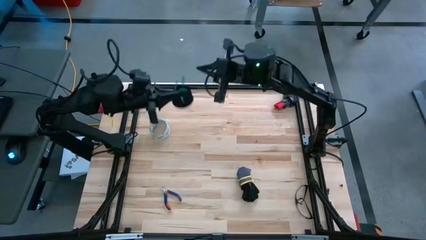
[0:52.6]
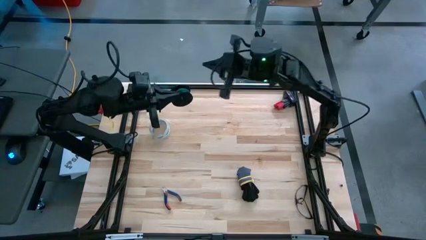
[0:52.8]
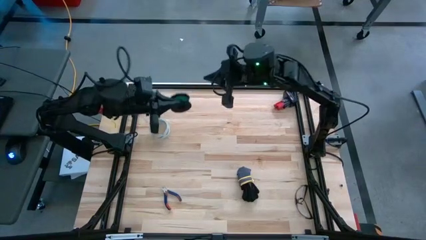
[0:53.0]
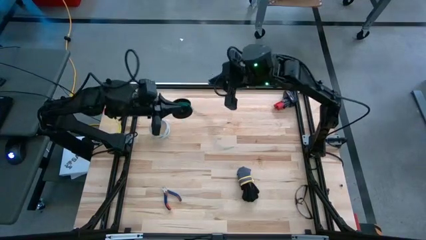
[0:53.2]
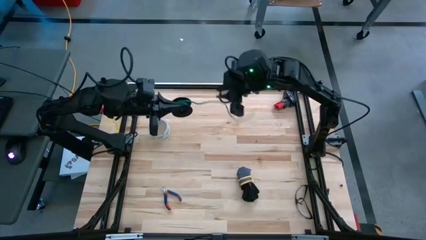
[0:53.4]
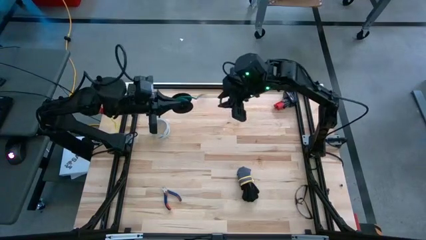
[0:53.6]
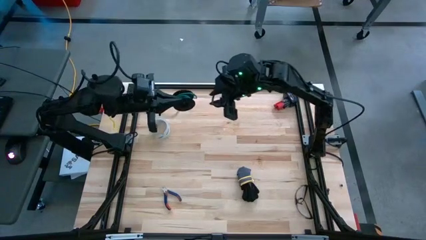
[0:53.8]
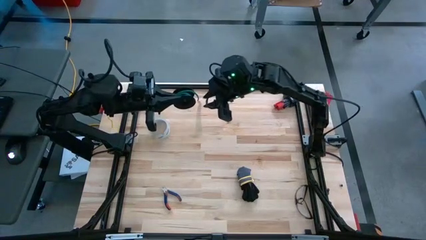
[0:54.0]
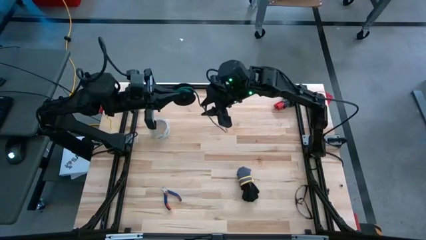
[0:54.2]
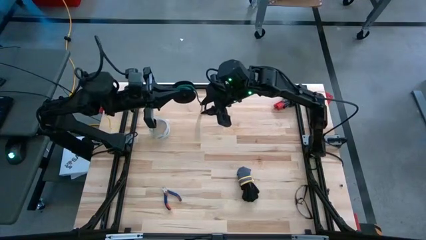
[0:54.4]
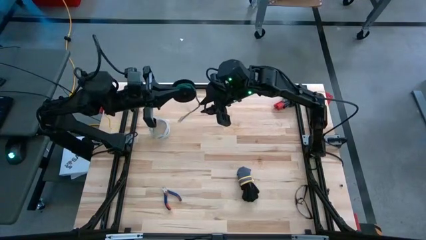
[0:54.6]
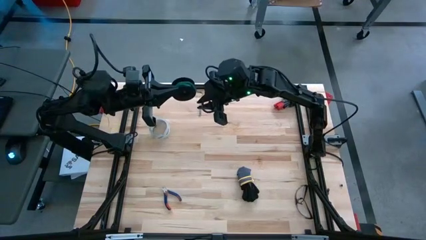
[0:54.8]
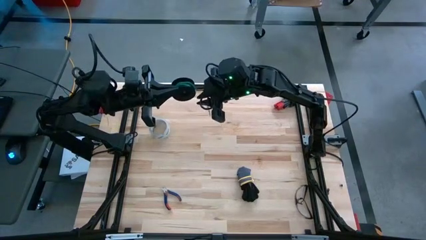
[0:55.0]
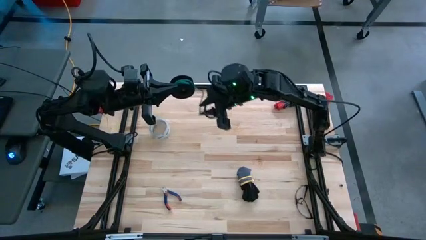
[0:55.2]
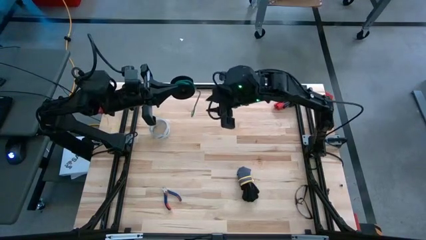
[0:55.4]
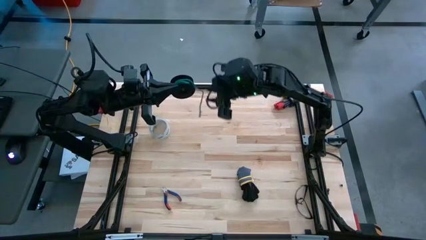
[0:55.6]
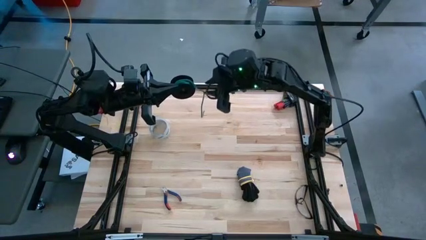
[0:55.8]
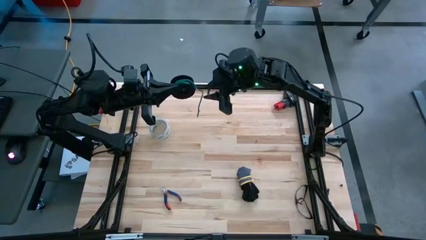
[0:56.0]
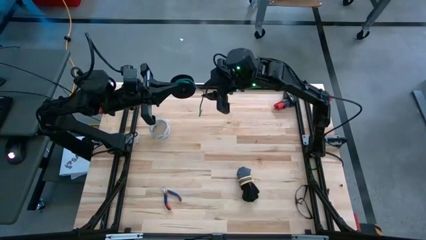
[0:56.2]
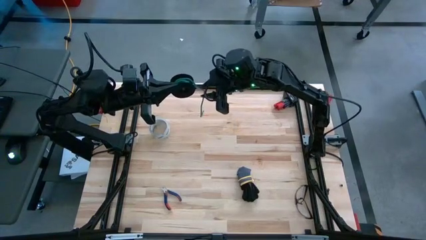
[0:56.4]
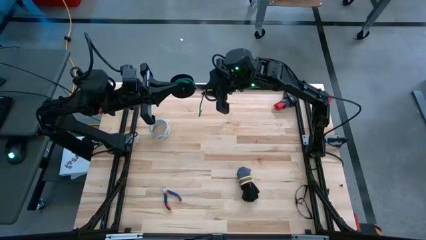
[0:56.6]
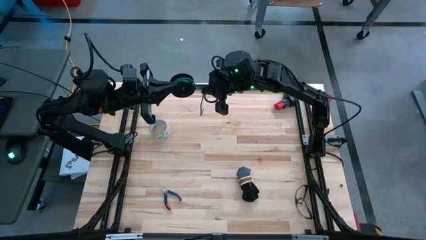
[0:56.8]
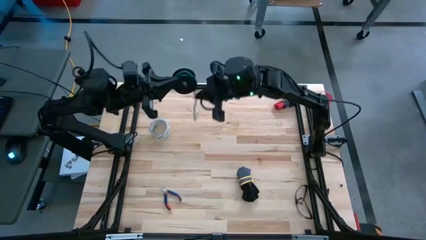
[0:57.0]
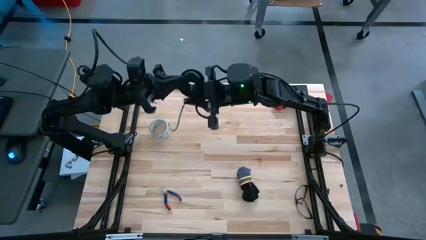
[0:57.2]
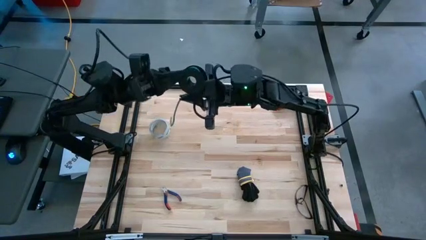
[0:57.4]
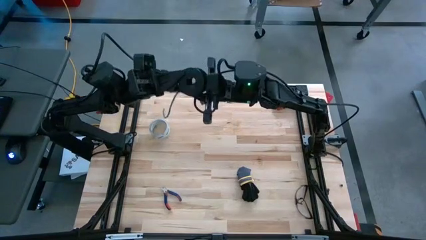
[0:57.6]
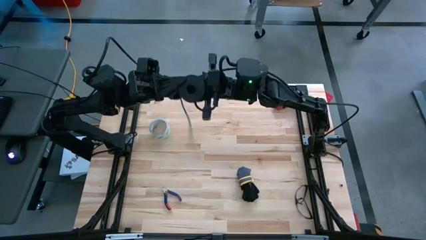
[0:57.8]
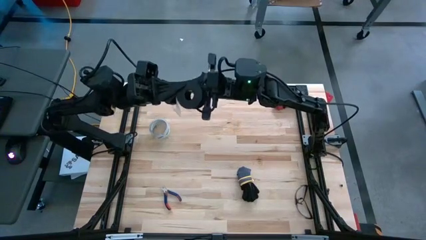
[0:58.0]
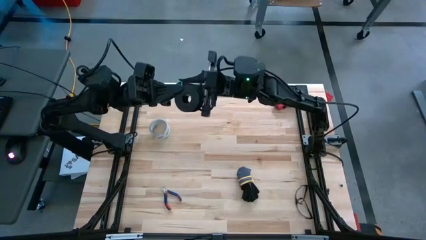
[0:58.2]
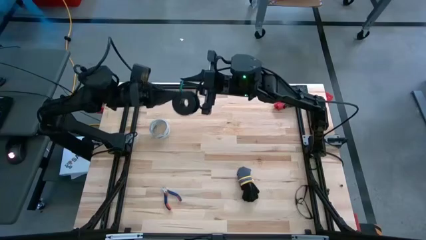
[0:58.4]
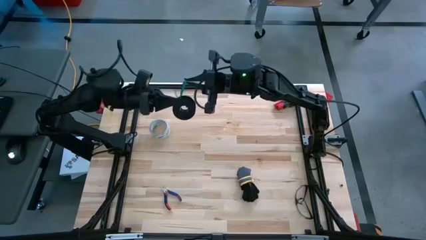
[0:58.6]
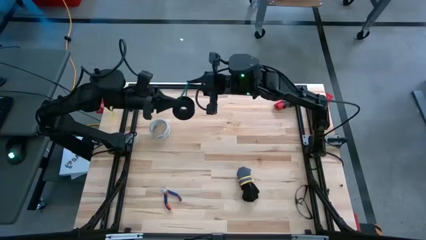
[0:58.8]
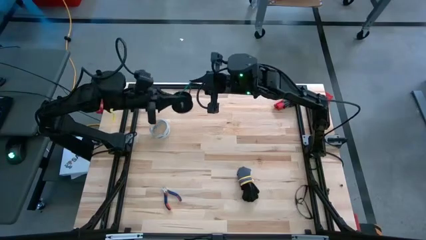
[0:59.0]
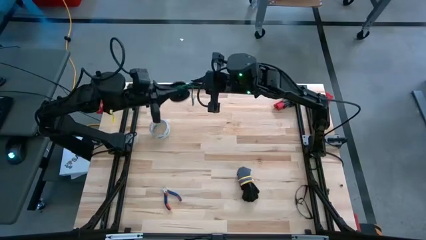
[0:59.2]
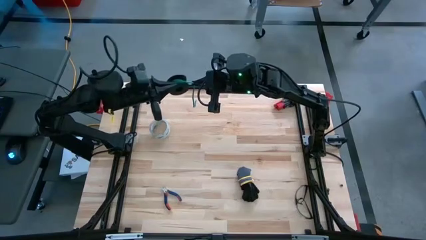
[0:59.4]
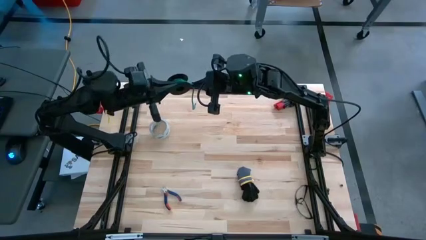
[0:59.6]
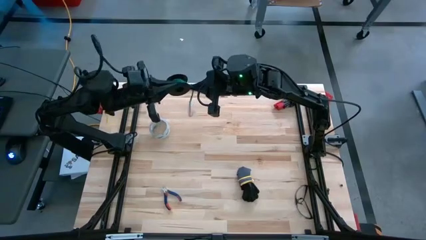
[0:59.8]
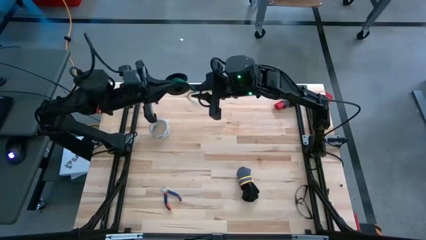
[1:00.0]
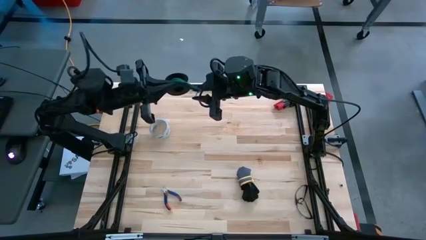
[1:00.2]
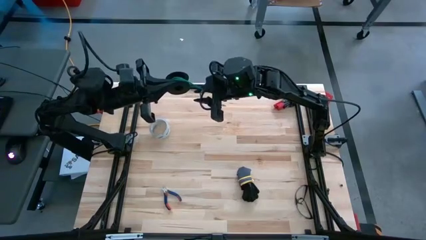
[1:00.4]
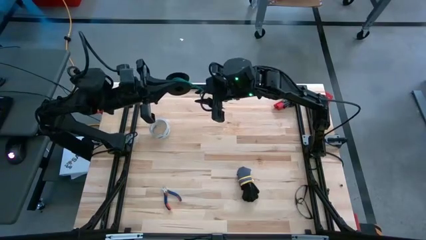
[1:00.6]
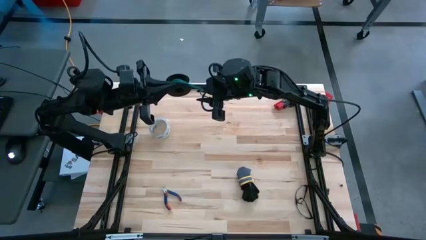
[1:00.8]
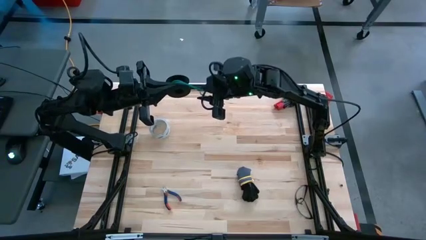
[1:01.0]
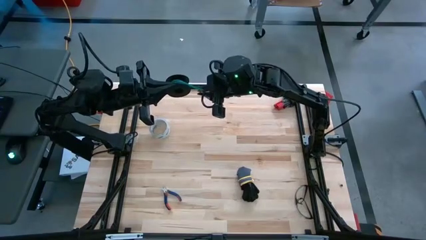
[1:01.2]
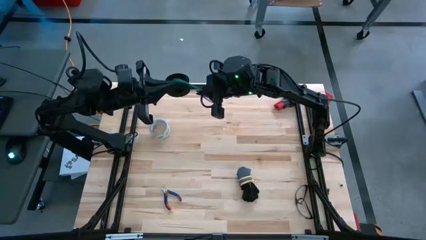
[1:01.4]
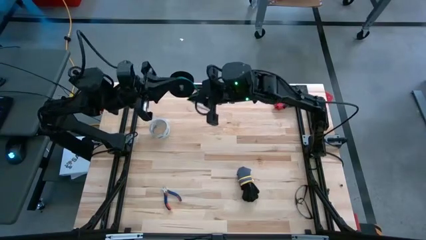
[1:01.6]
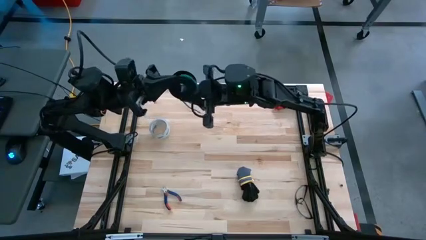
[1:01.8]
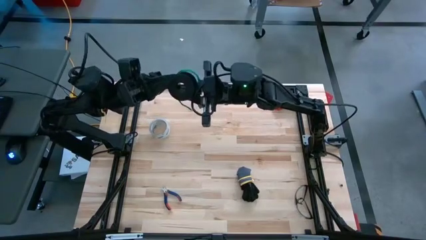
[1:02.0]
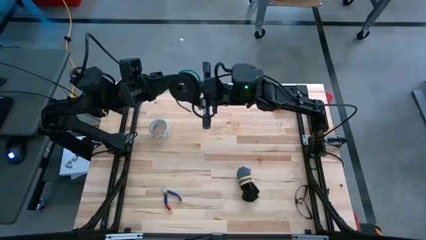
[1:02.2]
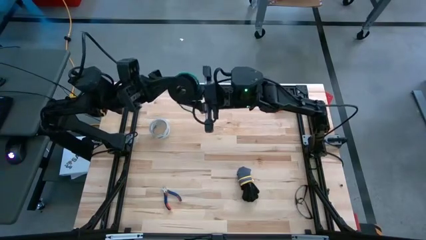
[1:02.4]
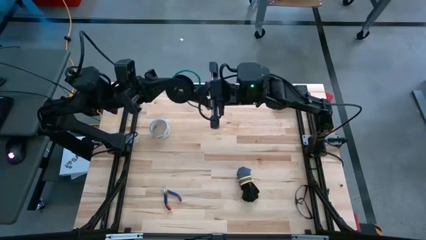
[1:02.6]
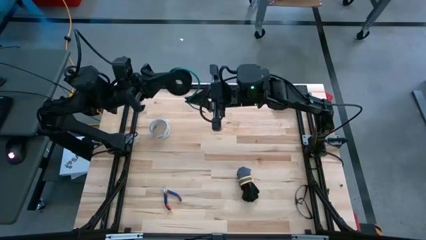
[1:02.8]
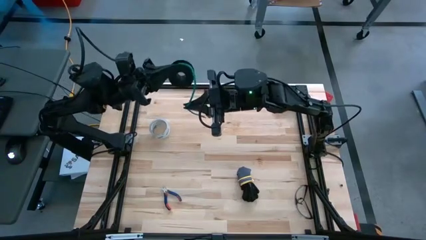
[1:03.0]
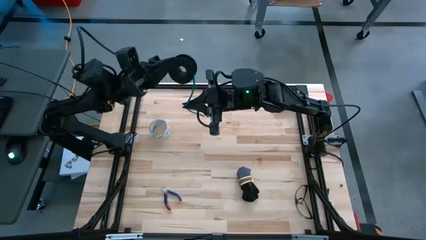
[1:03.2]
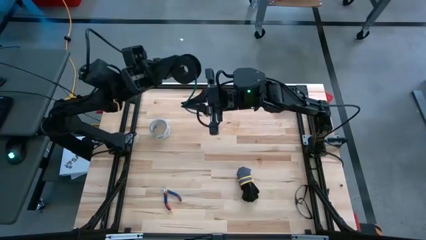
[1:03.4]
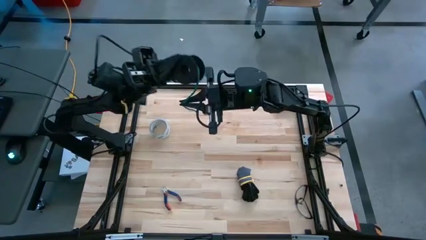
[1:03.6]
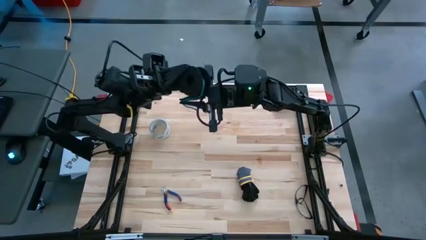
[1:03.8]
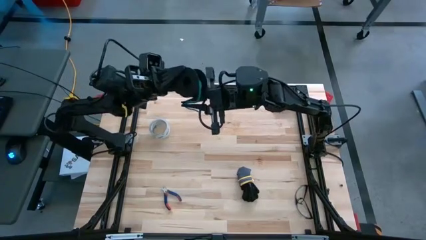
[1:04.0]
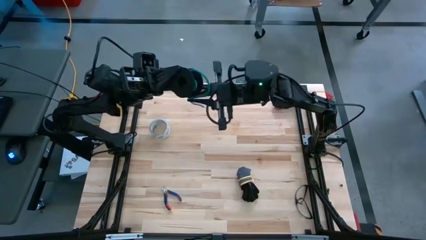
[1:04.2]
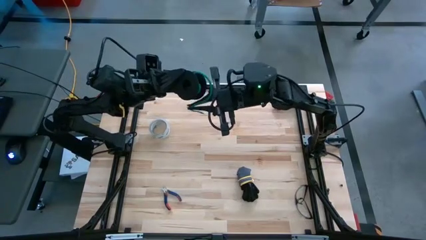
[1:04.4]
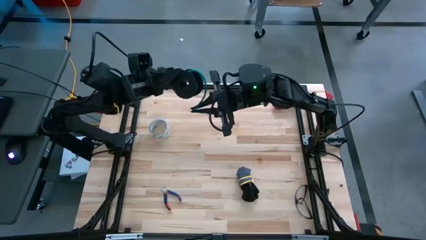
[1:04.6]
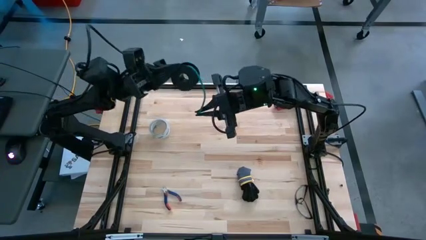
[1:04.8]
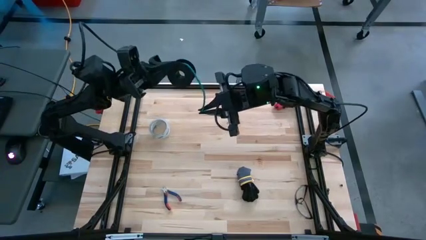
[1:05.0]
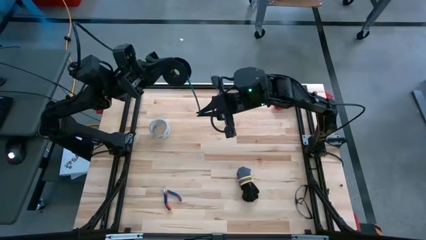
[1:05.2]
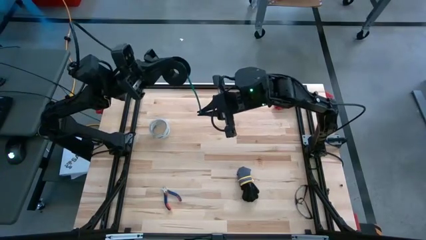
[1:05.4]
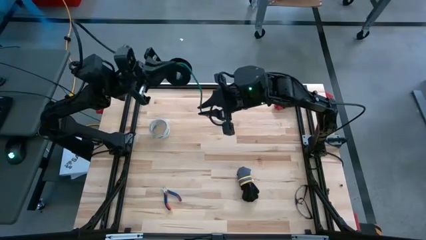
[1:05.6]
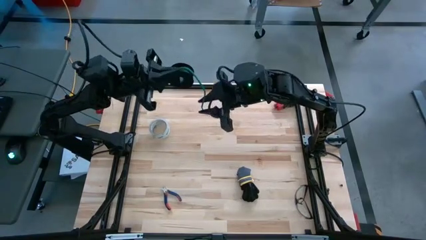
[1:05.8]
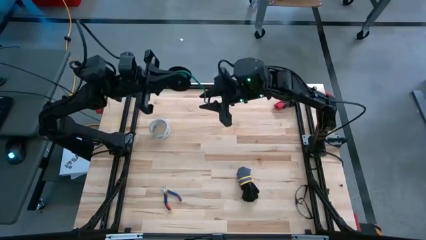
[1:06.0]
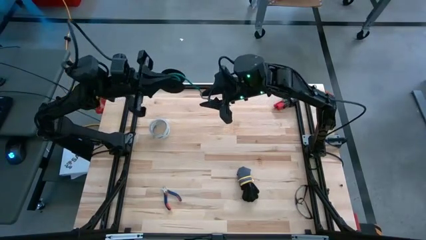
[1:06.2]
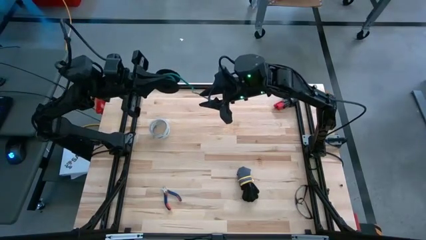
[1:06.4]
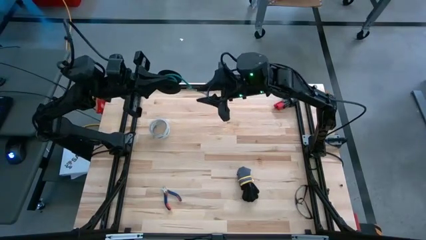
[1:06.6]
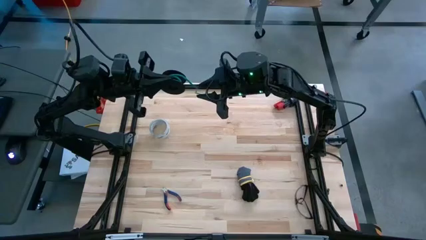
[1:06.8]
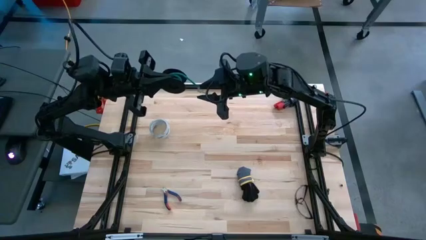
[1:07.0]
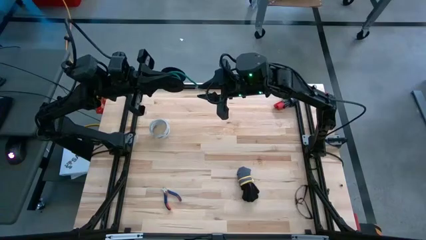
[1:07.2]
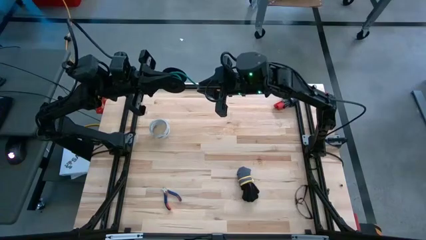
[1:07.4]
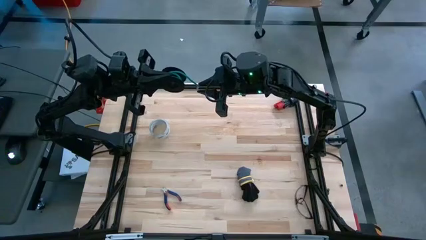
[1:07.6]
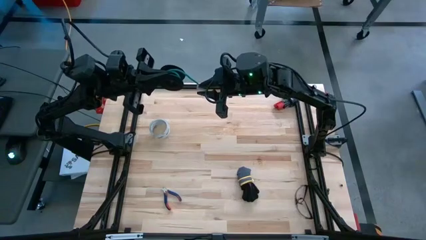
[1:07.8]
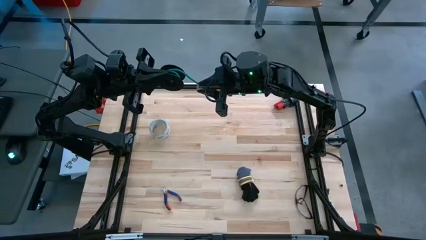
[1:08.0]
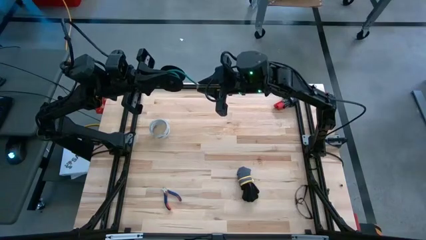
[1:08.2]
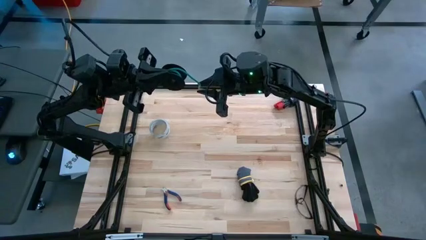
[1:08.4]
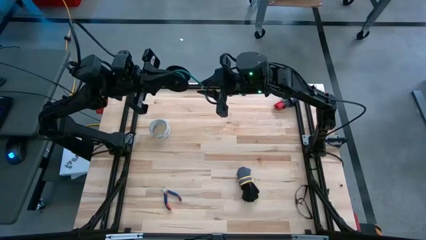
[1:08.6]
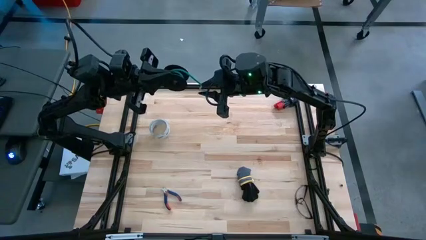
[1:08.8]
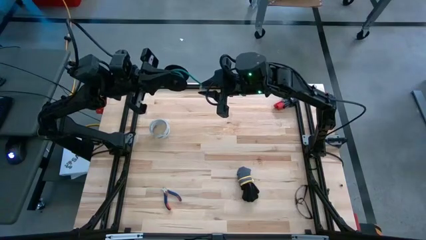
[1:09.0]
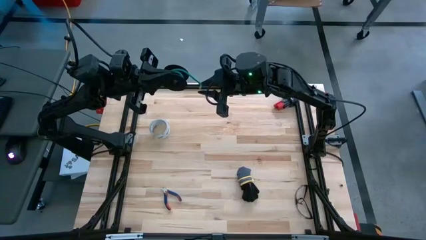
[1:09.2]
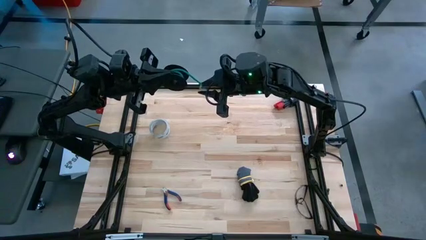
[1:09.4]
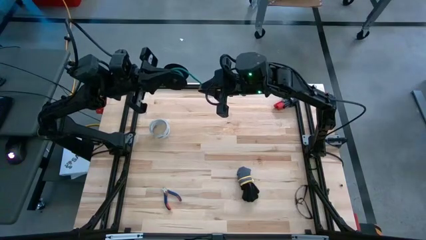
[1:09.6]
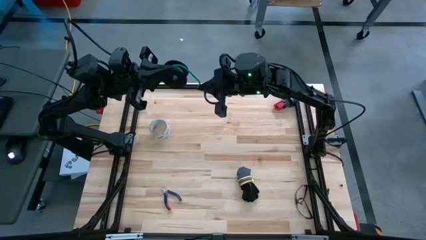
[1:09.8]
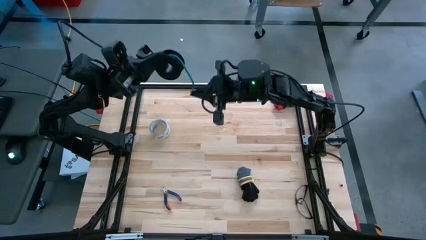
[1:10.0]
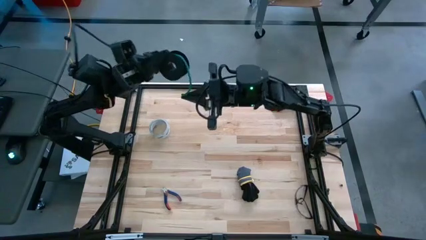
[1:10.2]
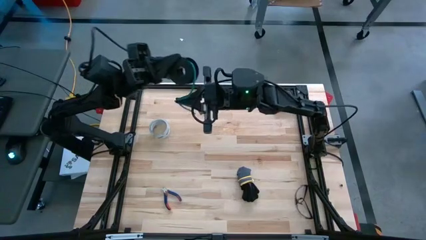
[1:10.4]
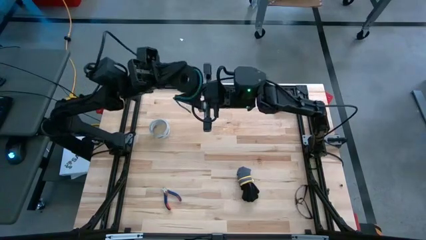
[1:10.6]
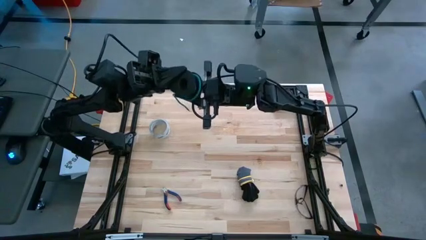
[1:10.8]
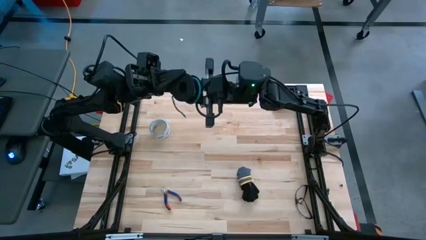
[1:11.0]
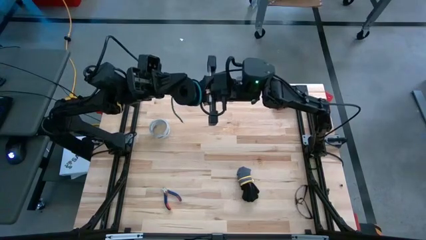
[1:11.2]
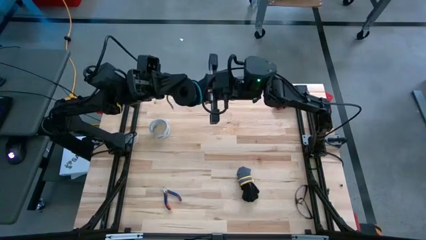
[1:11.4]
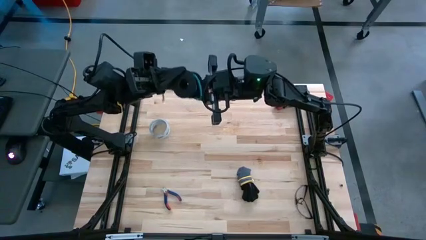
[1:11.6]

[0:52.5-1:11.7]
Task: Coil cords
Coil the green wire on the spool
